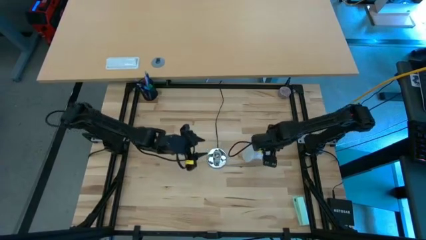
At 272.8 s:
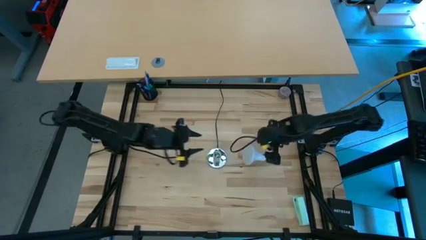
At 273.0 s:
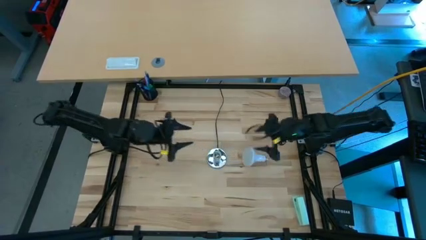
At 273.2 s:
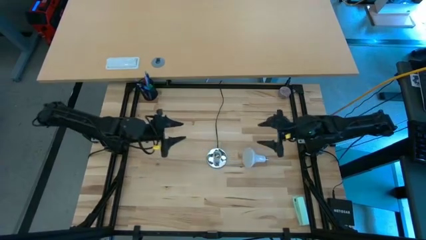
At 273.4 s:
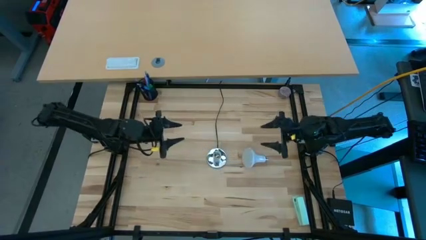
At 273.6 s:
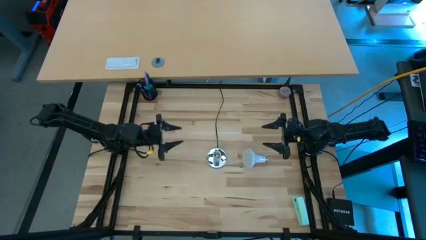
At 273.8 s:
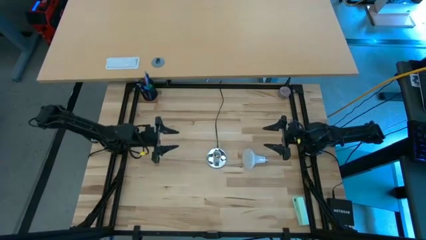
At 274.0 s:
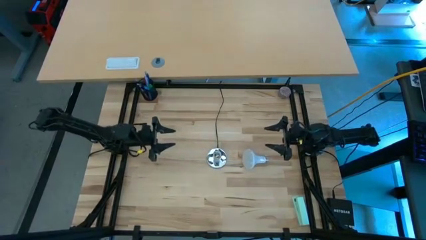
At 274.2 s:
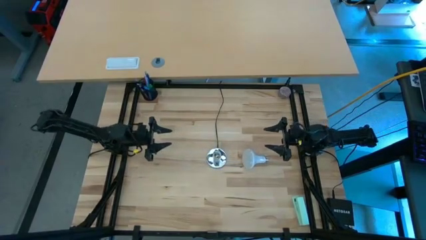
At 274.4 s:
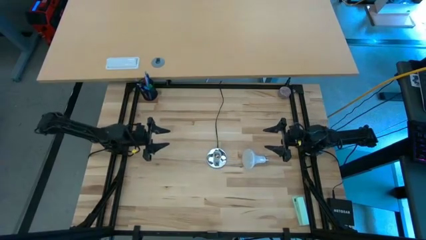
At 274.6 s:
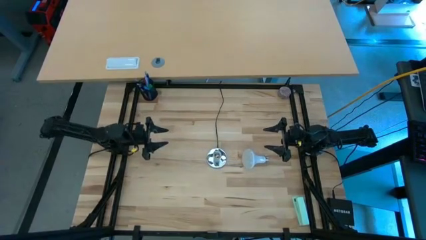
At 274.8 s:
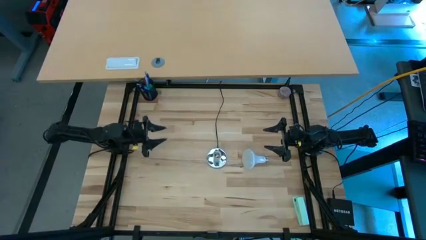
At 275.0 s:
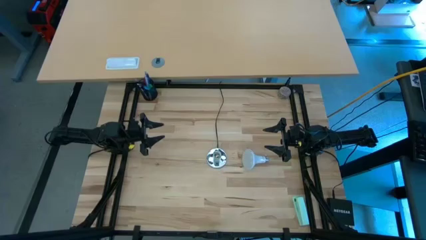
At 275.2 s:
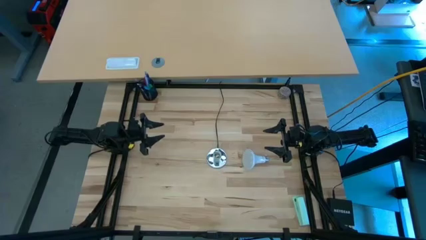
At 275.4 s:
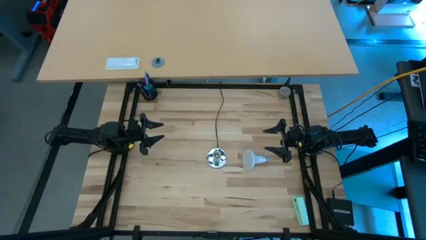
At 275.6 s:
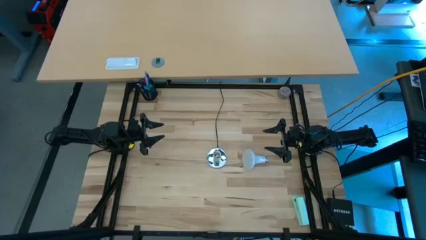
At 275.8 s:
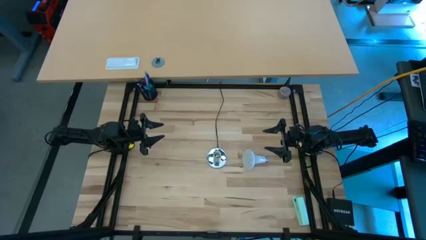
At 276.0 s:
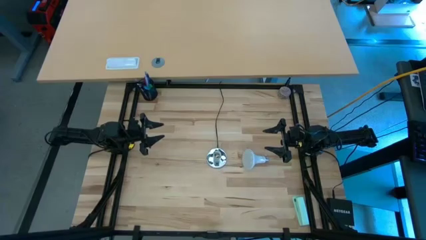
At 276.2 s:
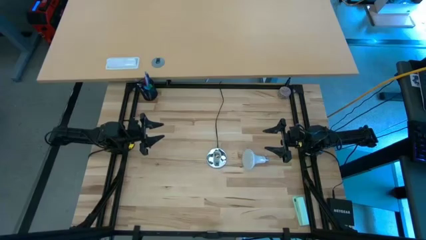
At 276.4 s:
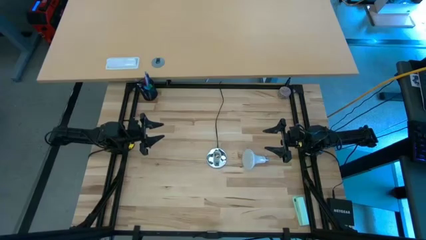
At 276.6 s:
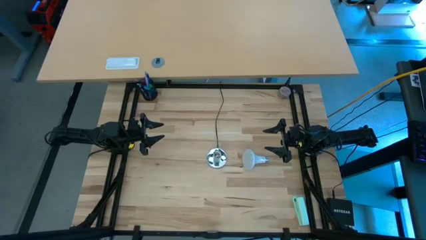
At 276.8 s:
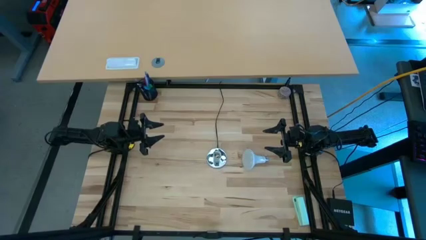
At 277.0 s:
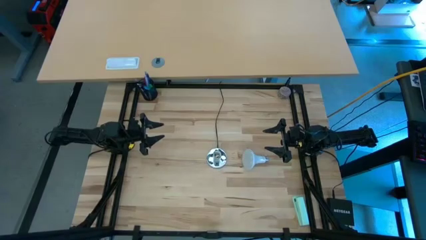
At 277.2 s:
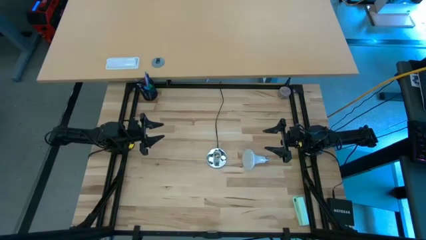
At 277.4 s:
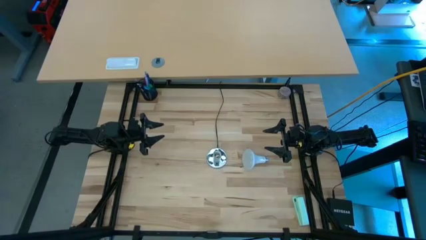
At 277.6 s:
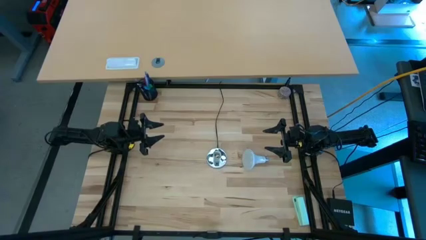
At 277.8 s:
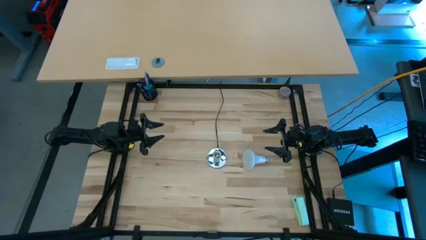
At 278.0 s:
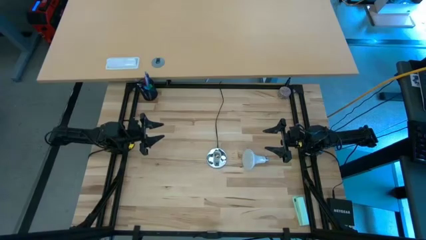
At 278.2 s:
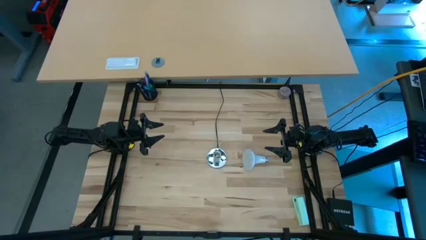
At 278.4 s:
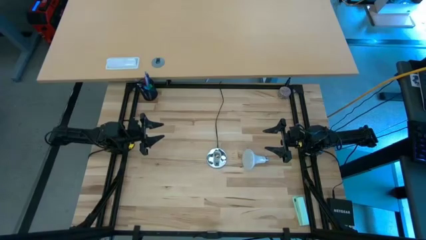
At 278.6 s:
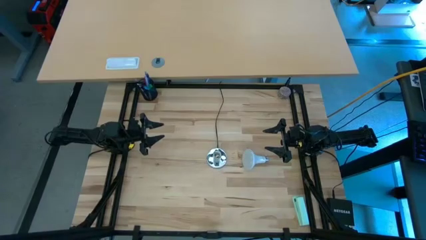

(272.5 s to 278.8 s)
Task: Screw lightbulb
Return to Home Position

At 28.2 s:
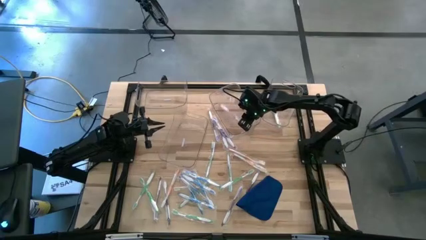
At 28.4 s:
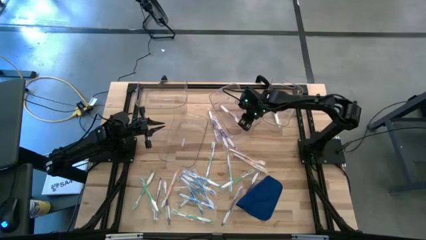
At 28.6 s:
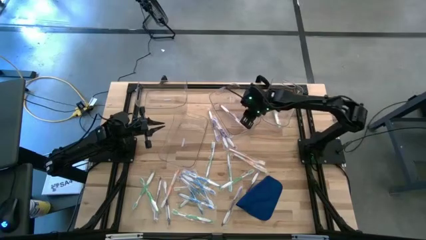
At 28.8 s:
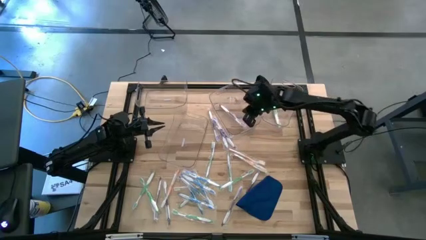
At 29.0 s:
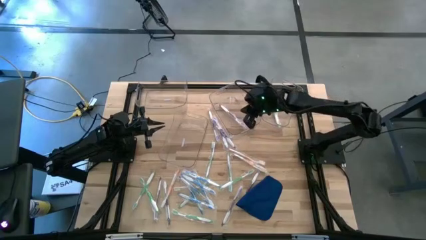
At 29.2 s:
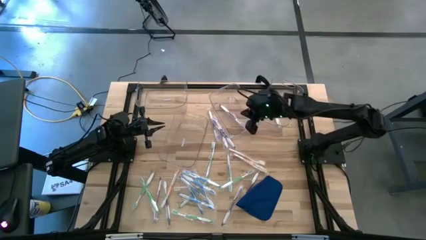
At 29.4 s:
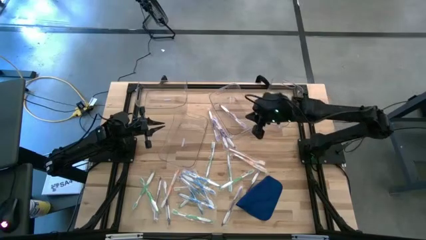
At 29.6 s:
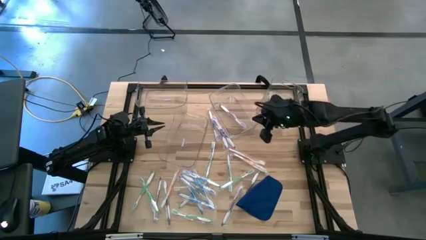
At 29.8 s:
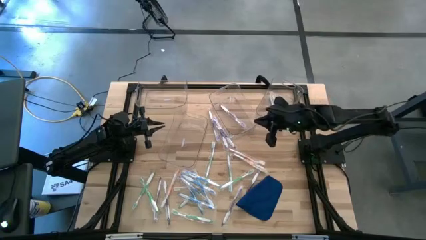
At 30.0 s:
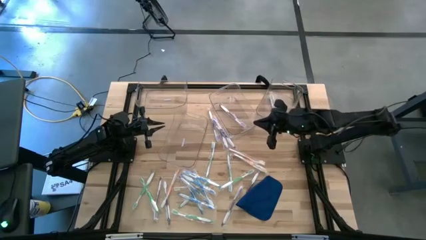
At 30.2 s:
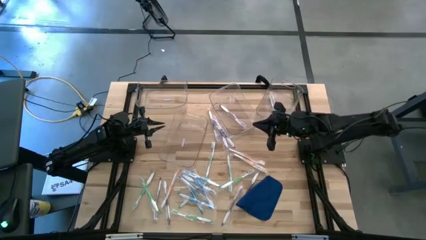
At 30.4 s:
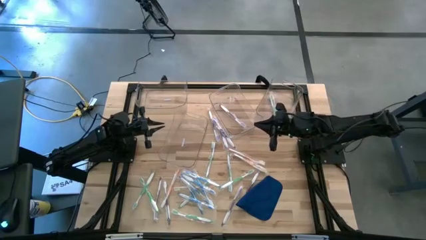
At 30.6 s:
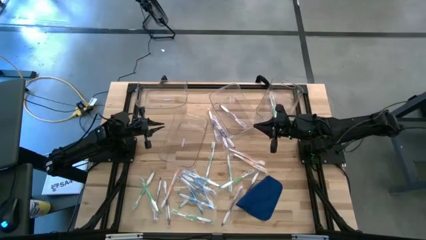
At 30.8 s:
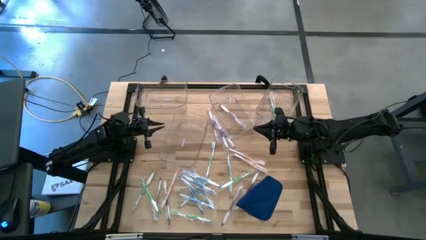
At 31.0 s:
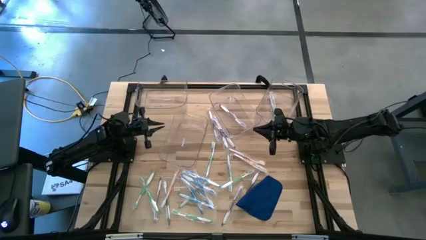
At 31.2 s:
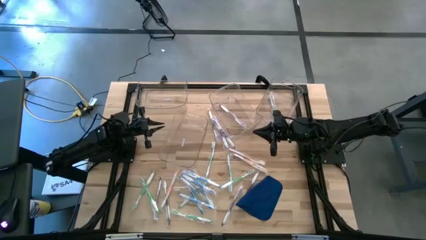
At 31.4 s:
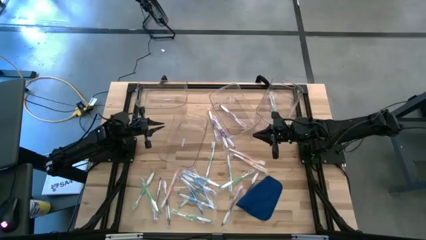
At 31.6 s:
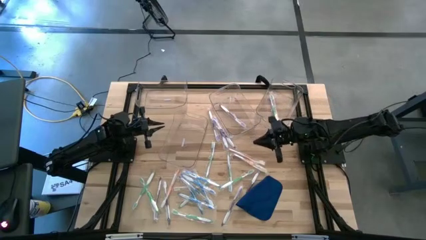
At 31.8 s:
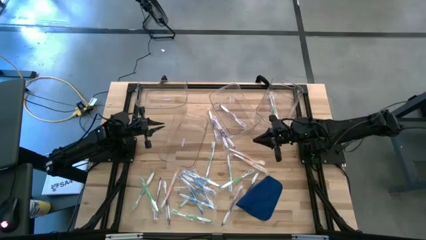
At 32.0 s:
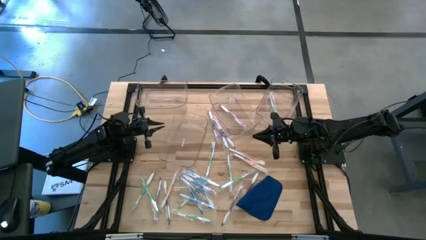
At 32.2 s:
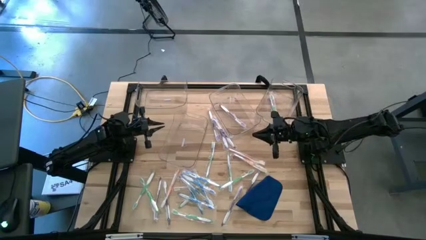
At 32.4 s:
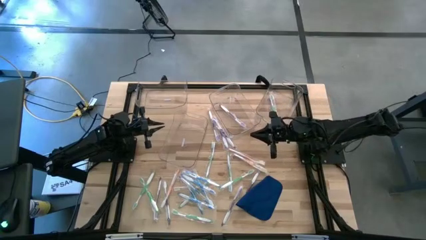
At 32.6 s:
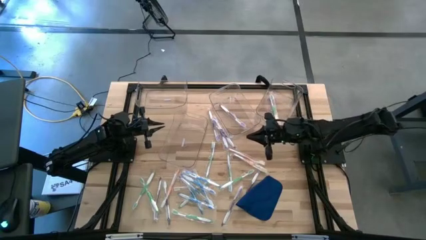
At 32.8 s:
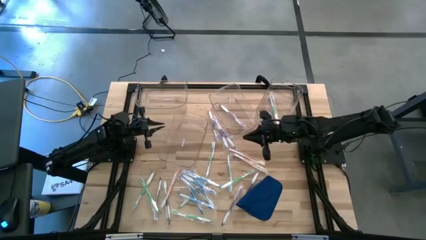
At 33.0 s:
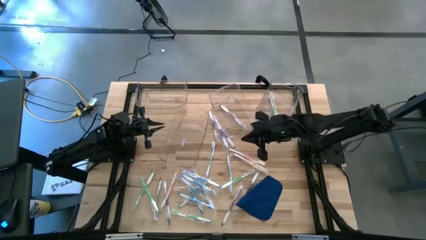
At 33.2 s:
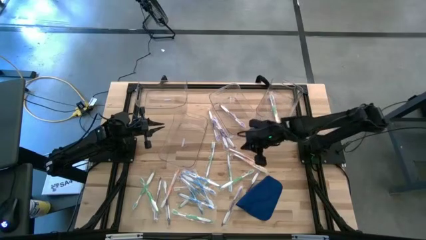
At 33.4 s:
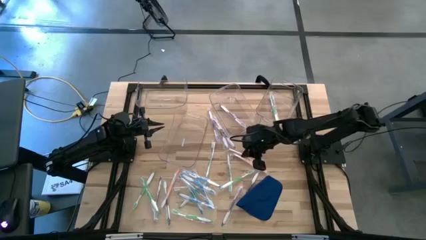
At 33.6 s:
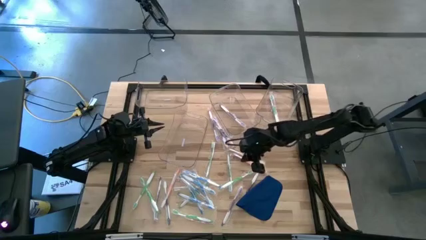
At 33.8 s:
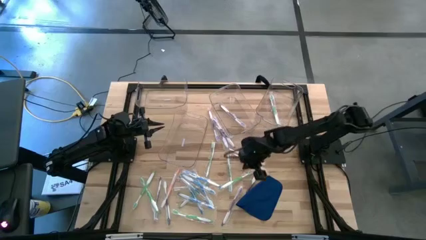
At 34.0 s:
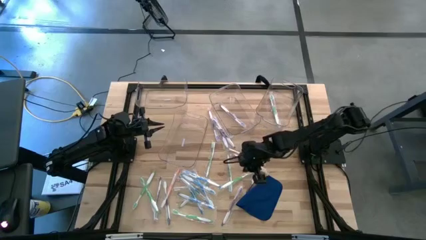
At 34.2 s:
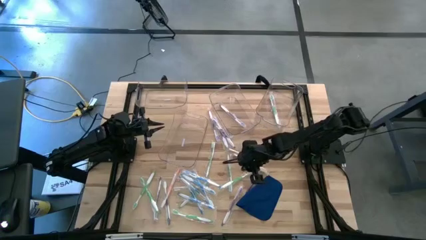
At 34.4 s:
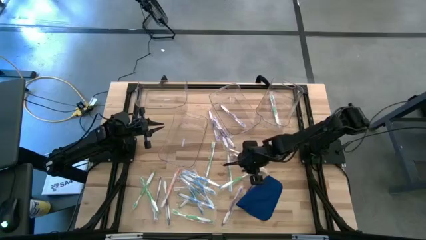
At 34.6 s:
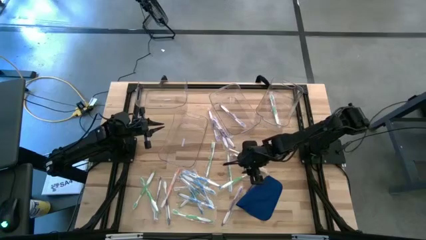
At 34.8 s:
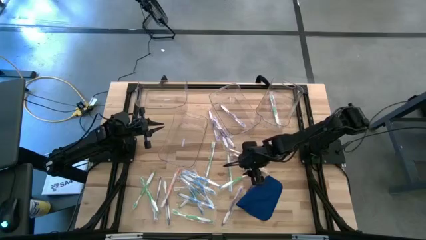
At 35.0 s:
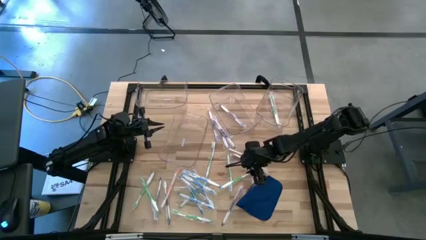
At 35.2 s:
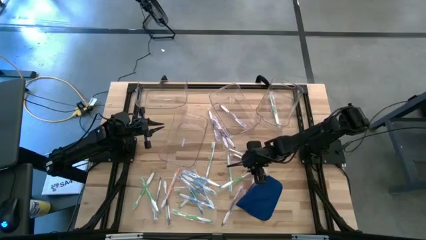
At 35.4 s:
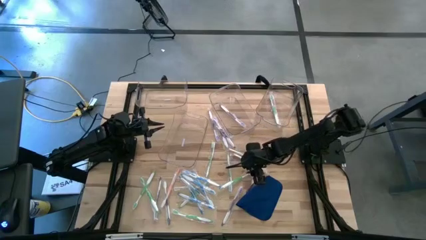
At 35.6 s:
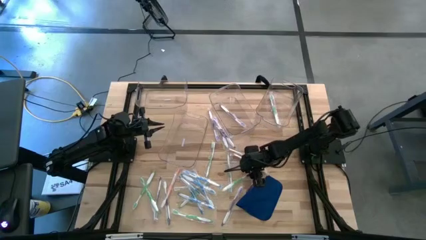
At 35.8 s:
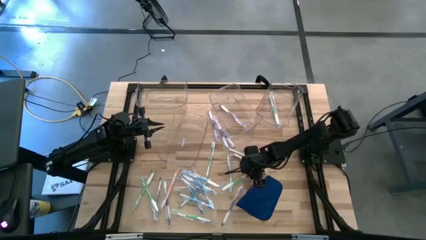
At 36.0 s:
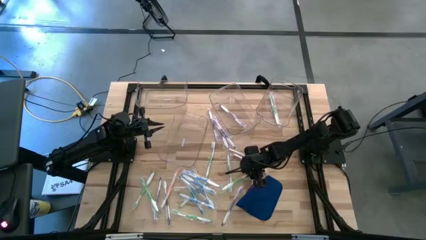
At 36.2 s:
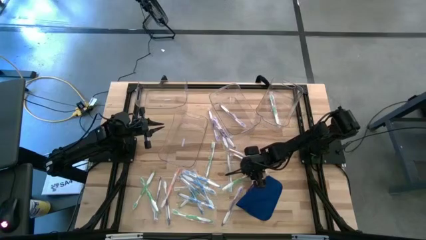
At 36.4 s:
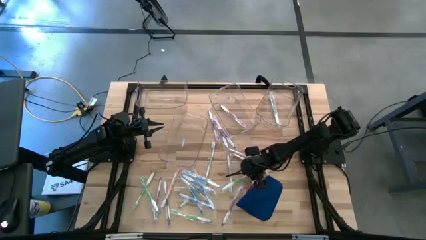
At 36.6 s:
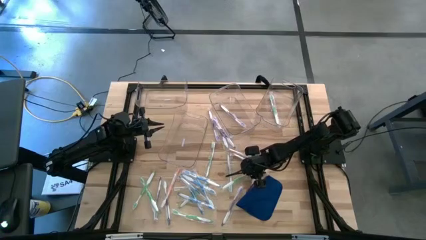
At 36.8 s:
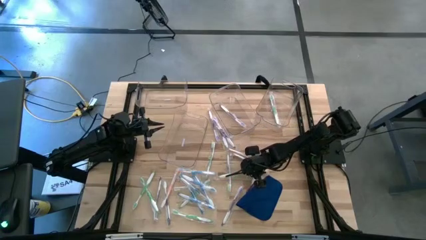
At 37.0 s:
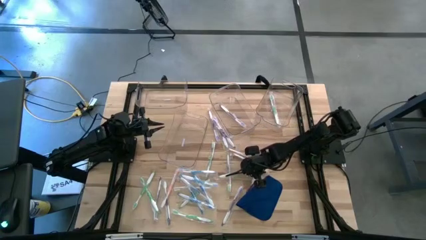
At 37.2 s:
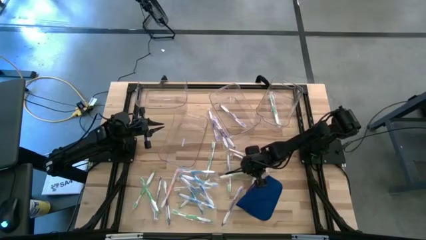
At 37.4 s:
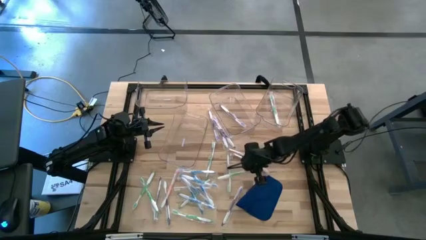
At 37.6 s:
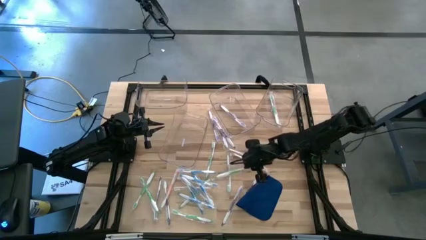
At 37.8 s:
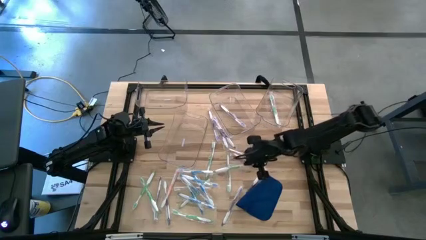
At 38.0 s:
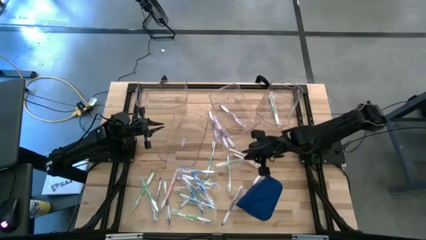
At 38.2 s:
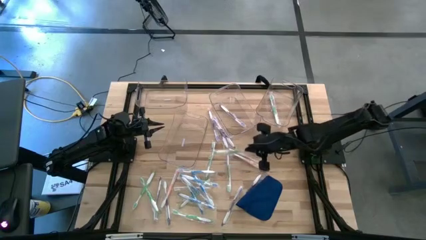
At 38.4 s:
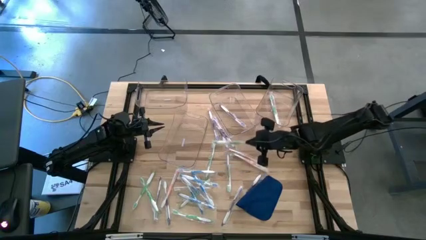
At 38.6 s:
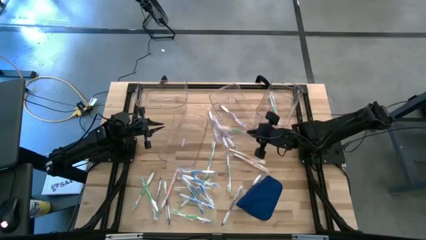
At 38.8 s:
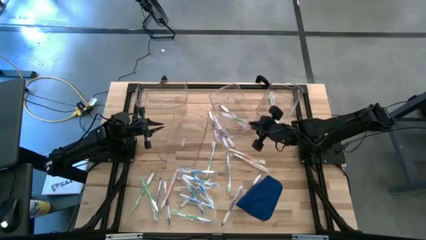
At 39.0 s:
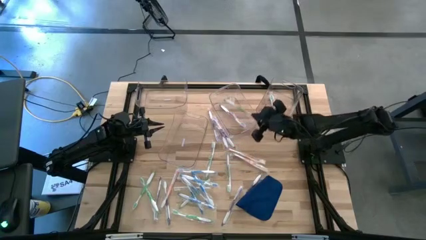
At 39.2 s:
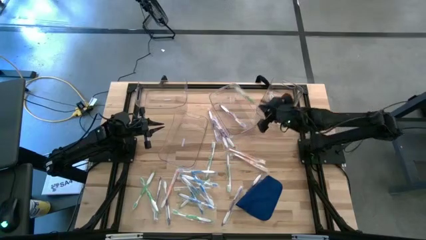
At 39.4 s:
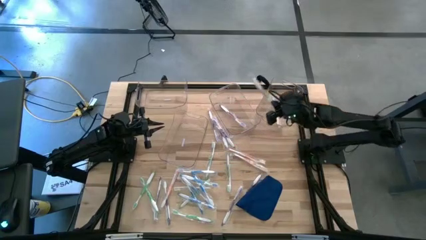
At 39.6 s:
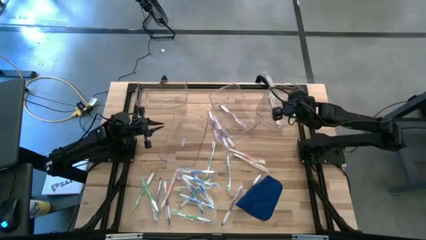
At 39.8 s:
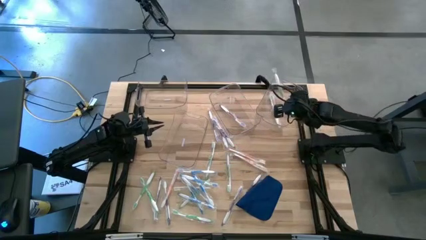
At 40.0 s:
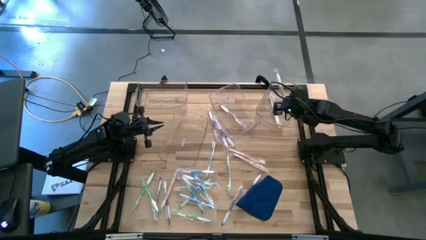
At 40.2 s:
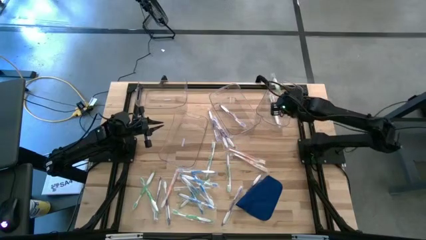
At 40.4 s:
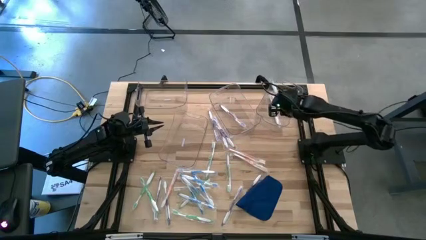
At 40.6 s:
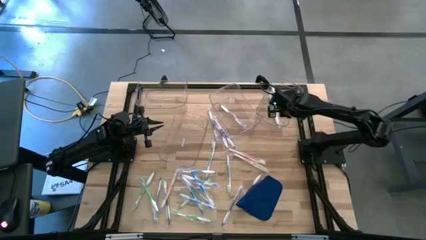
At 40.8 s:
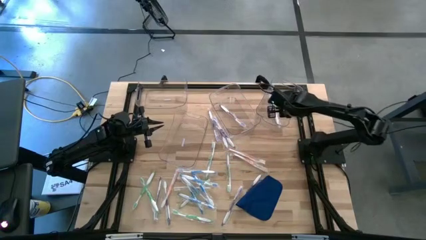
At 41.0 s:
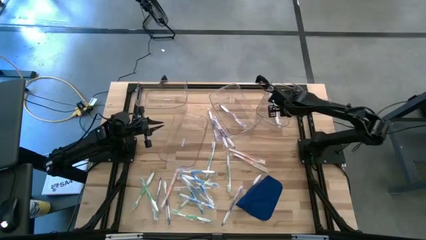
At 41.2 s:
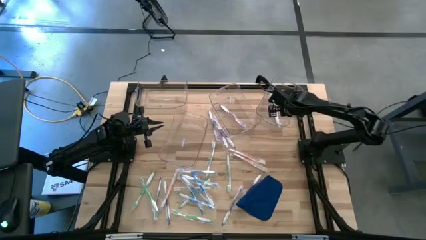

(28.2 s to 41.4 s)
Task: Pick & Place Toothbrushes
Put the green toothbrush into the top right transparent bin
